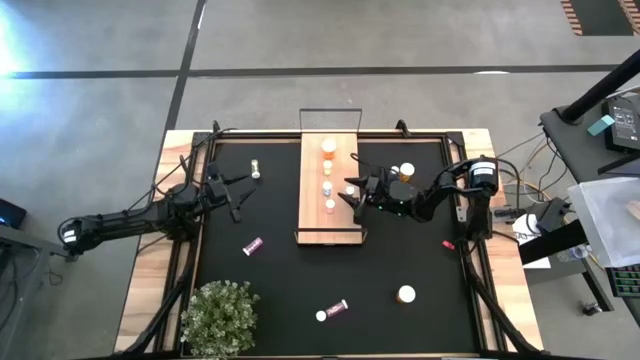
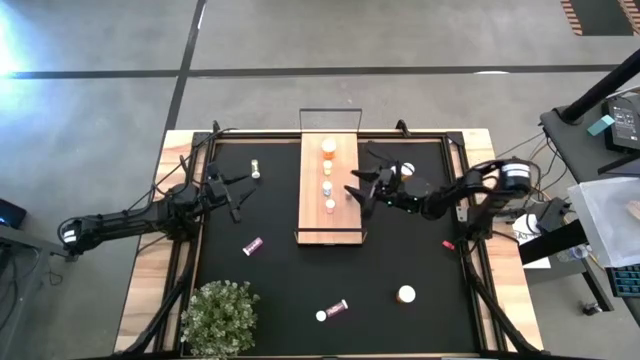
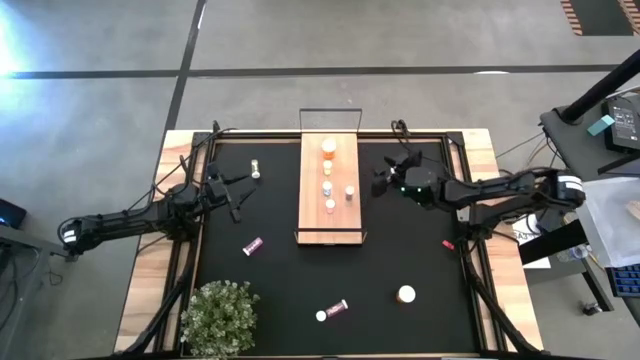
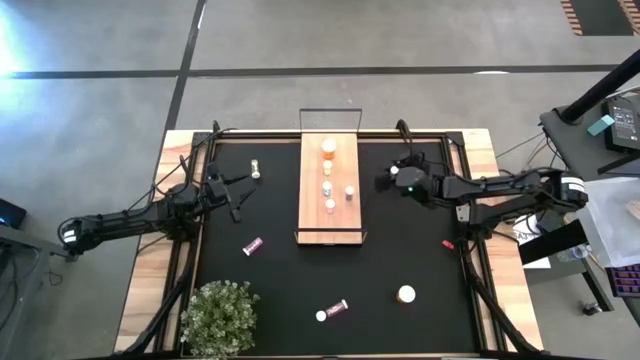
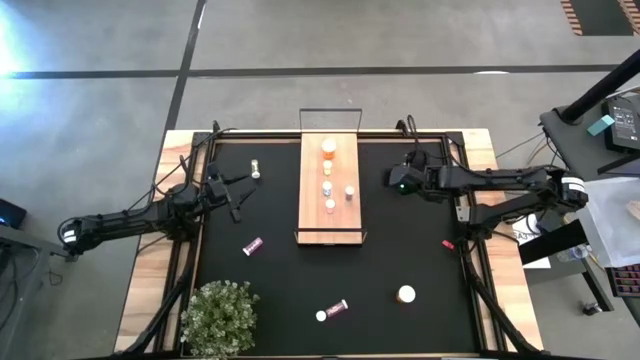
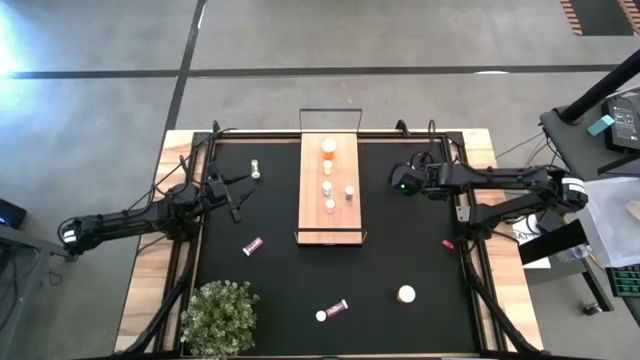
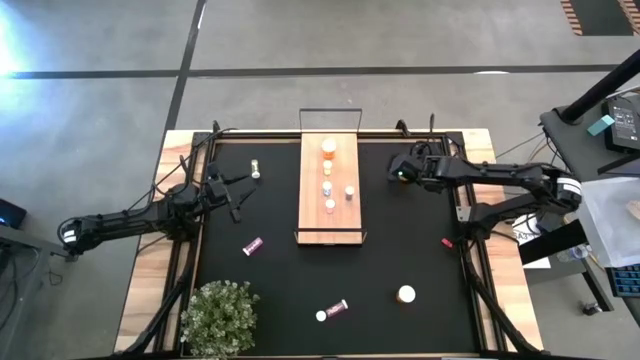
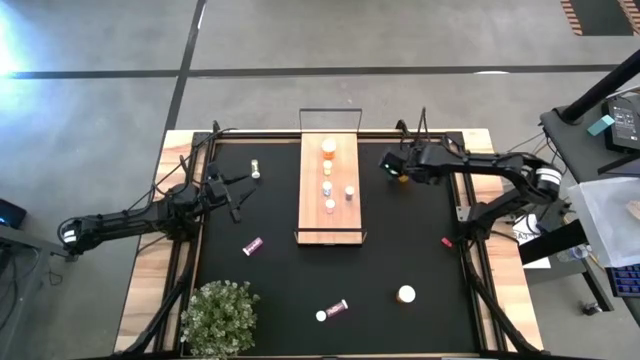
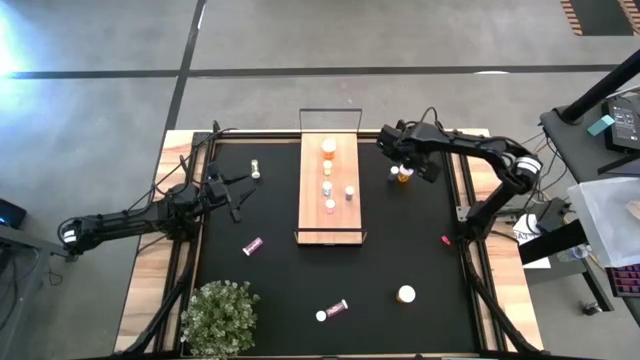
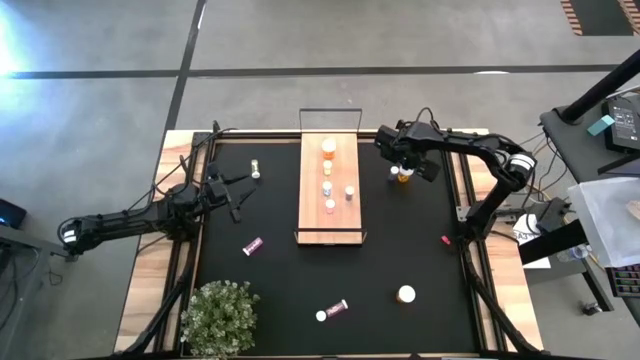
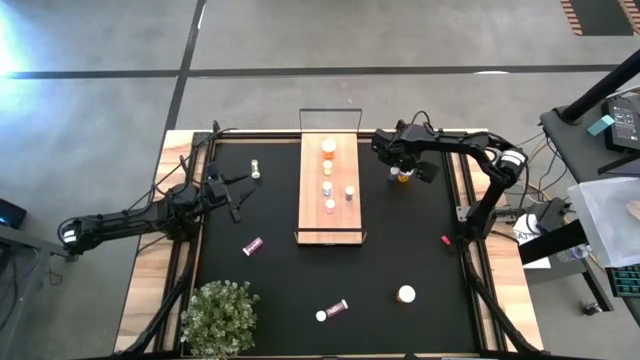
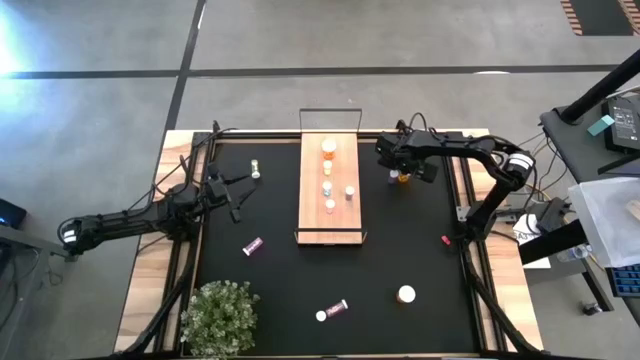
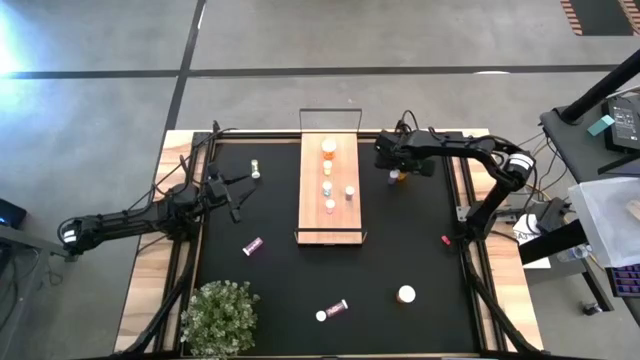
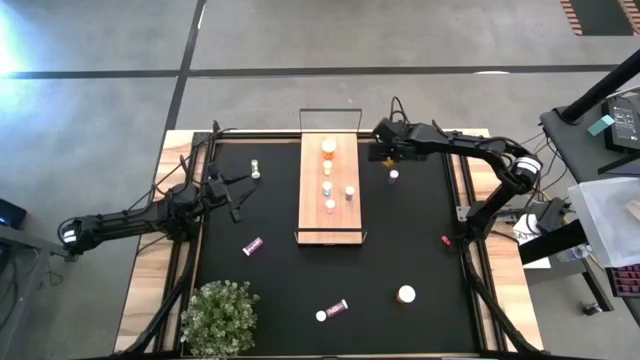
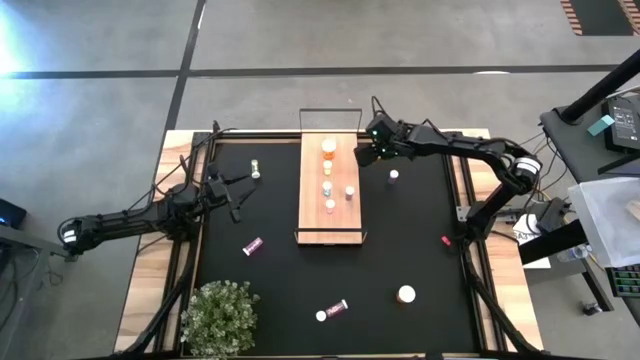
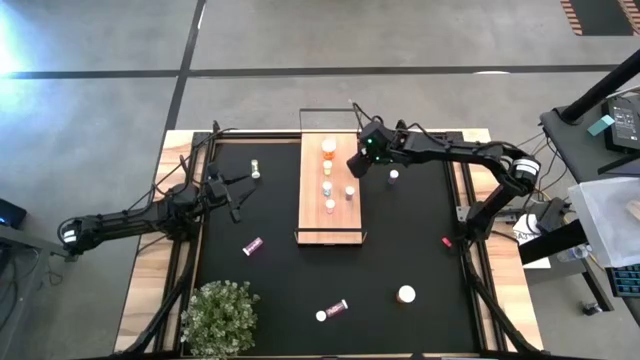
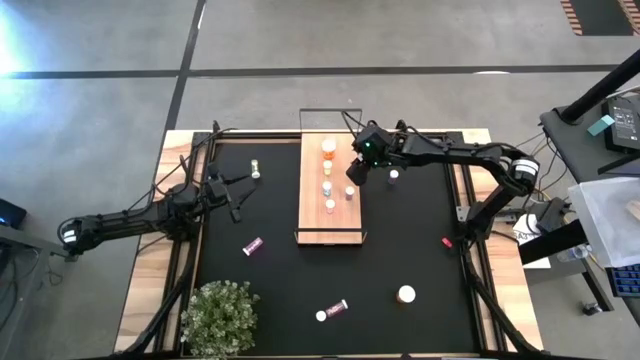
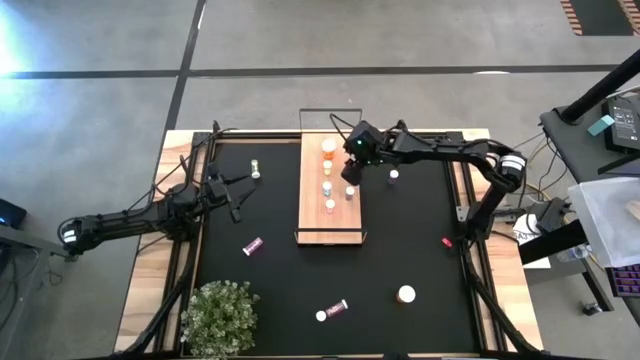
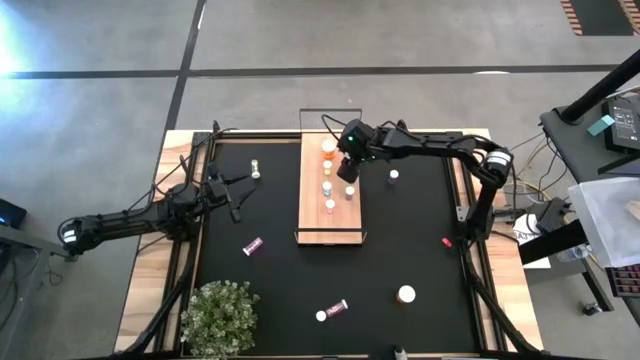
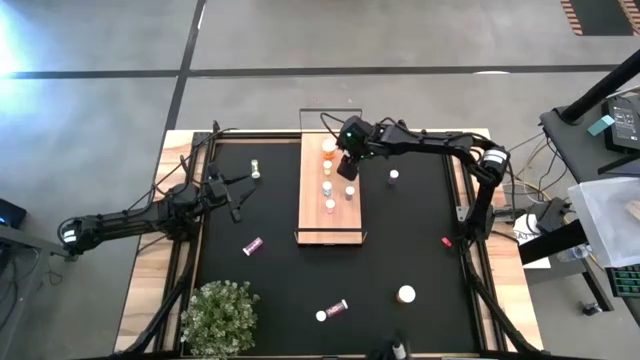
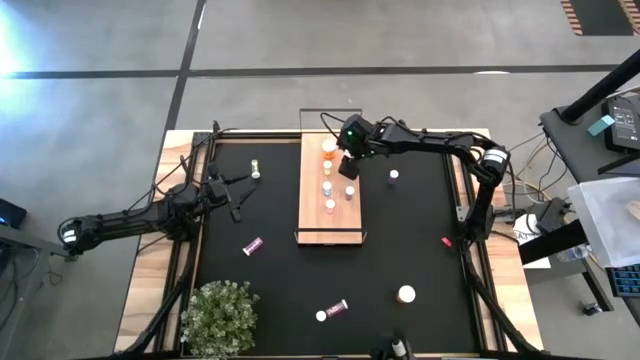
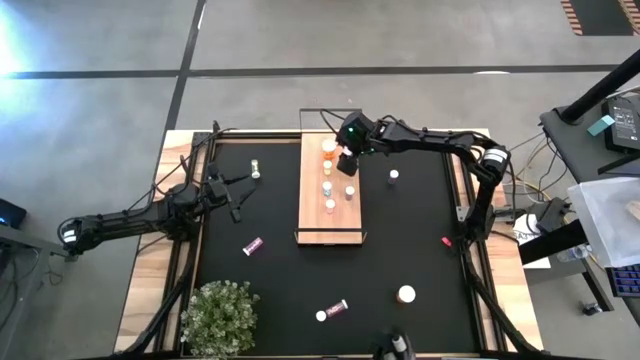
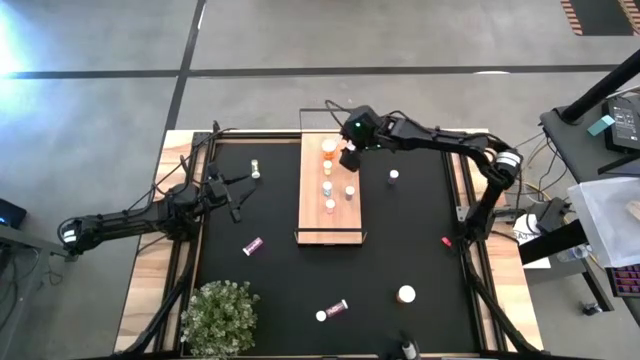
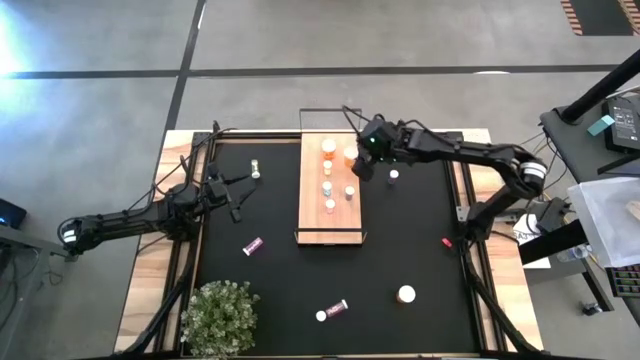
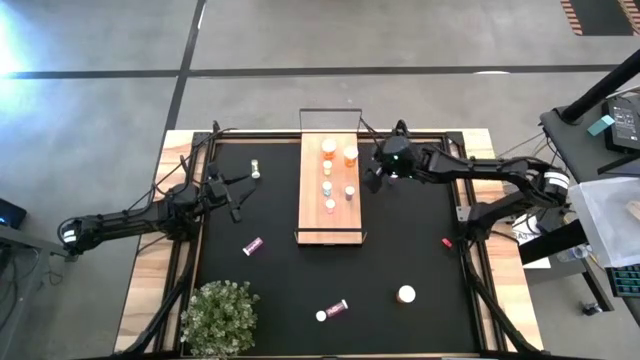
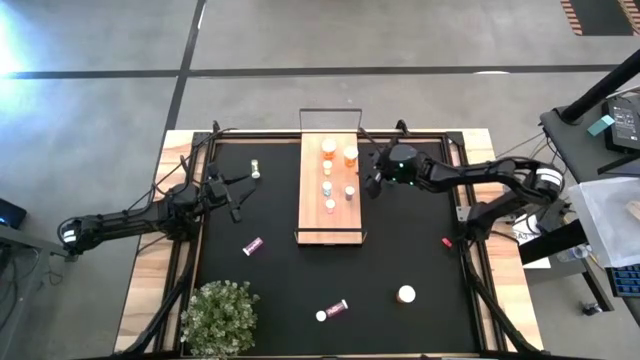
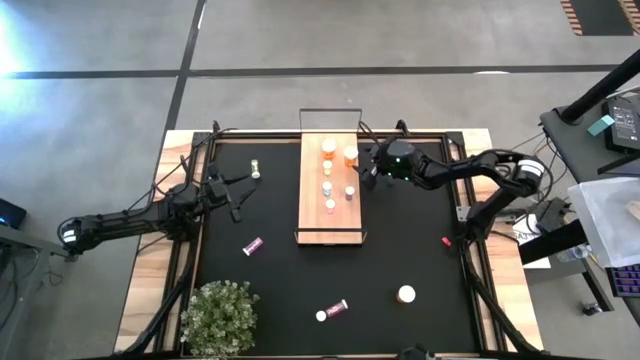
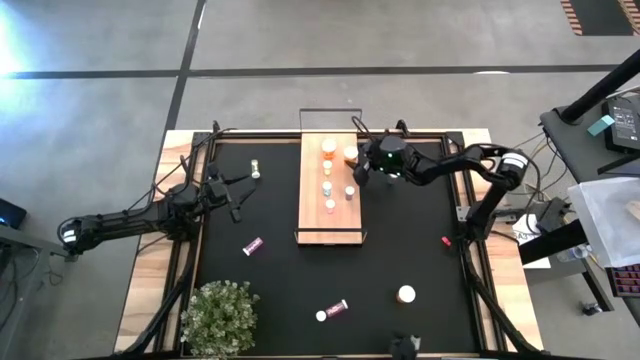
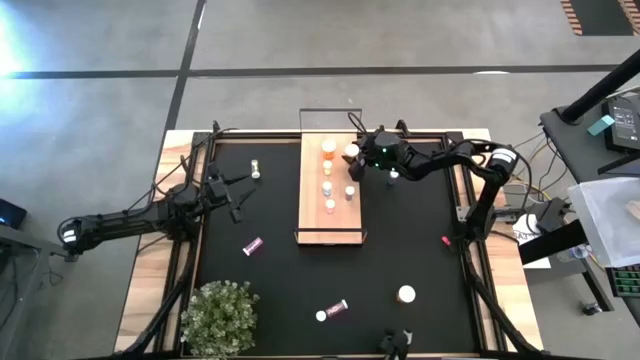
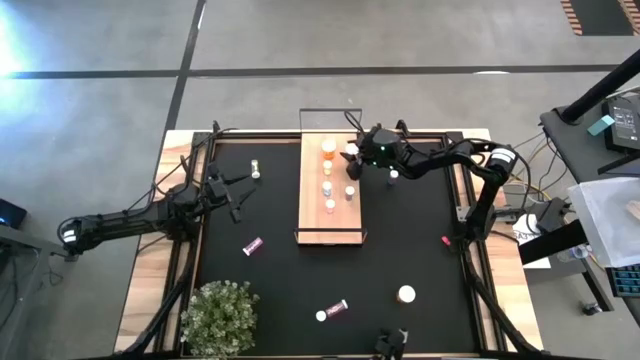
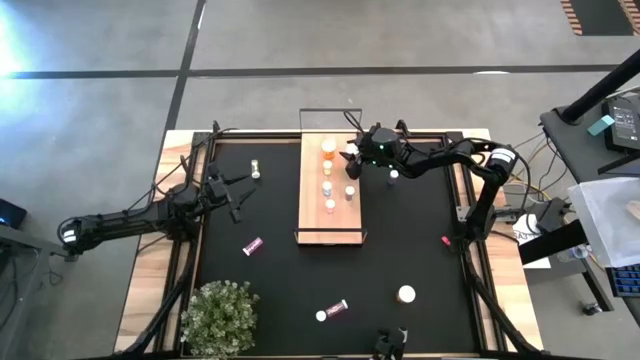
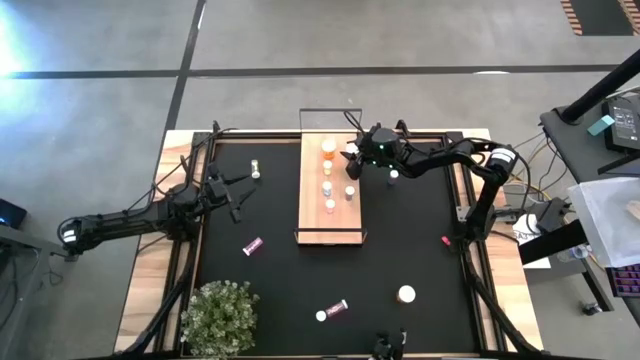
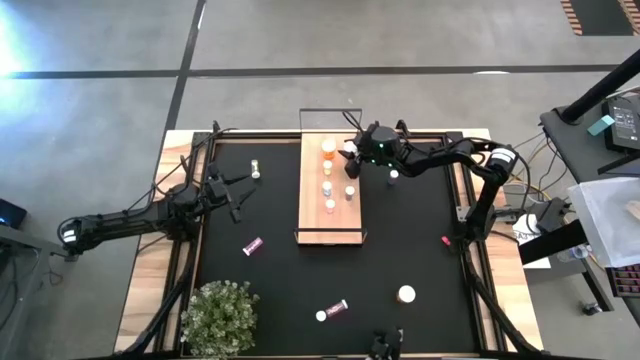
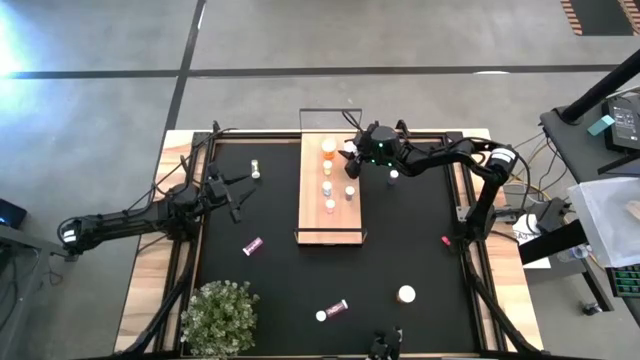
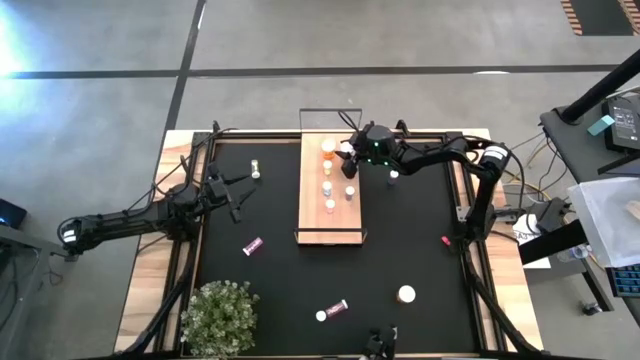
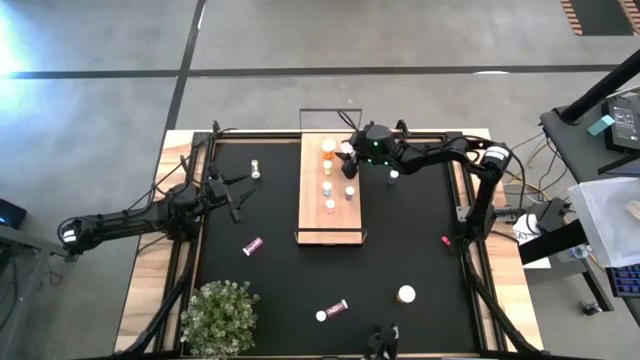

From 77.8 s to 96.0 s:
Task: Pick and place medicine bottles onto shelf by color
Put the top orange medicine bottle on the shelf aligned with the other orange medicine bottle

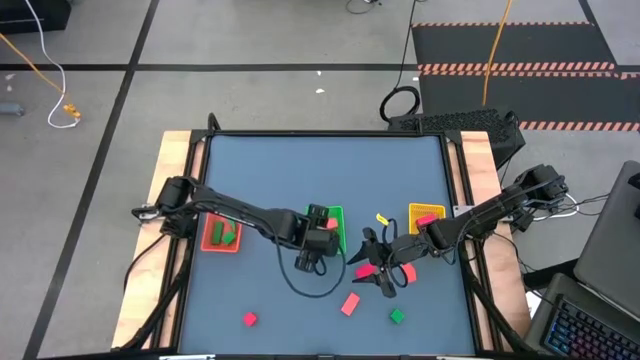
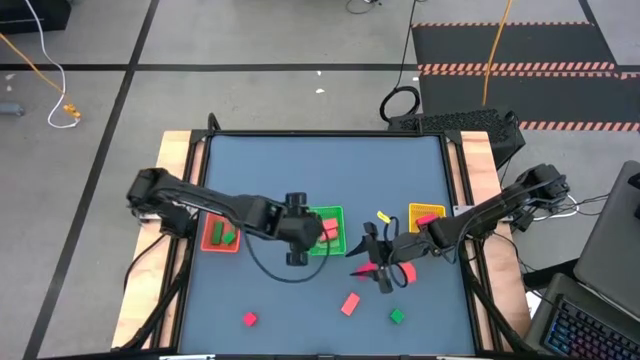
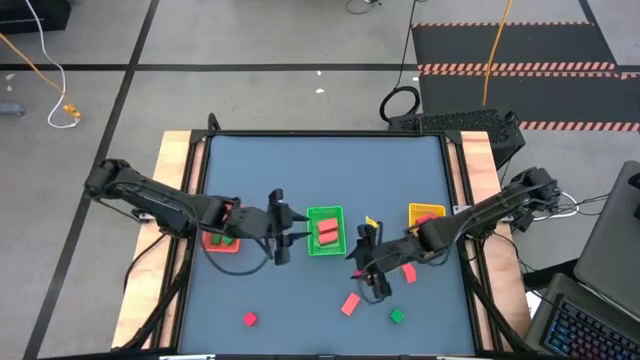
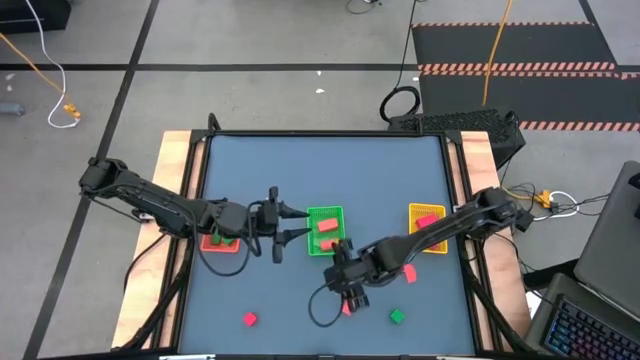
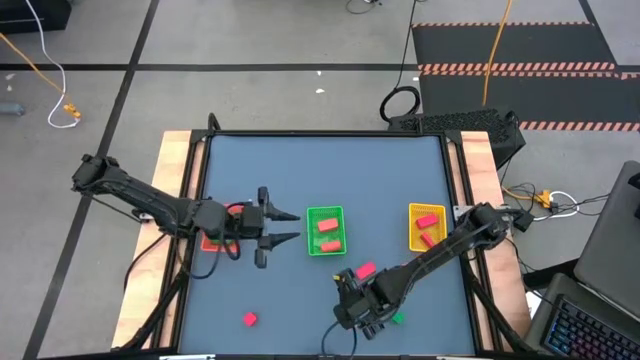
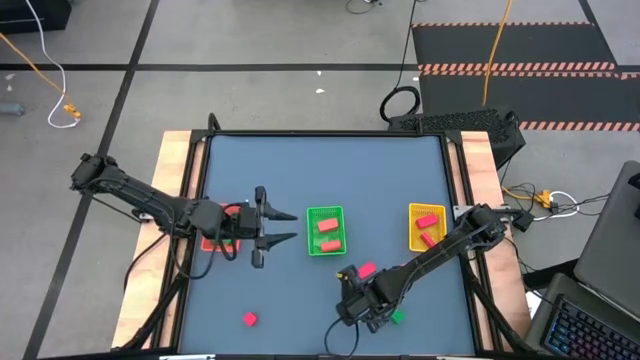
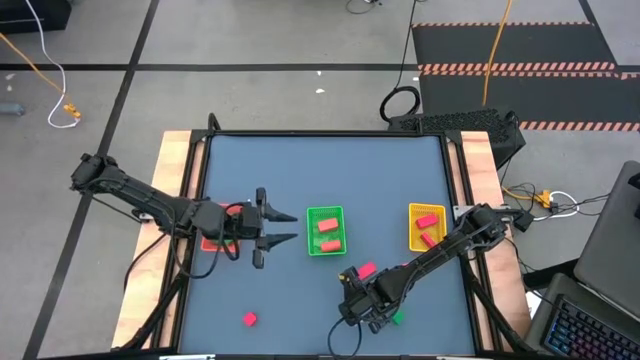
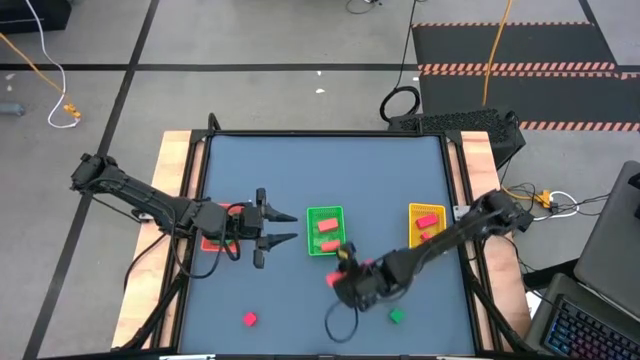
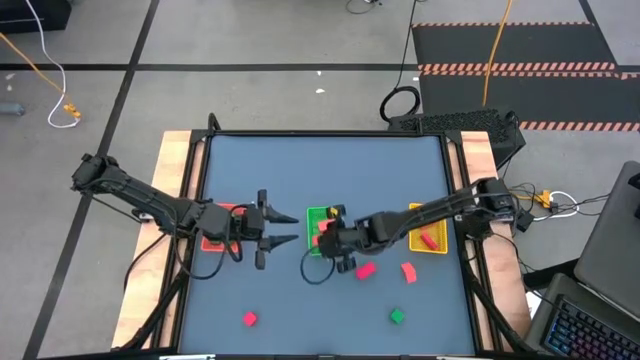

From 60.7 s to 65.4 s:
Task: Sort & place blocks by color
Put the orange block into the green bin
